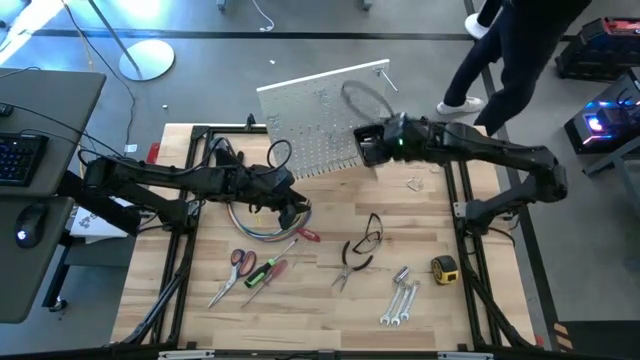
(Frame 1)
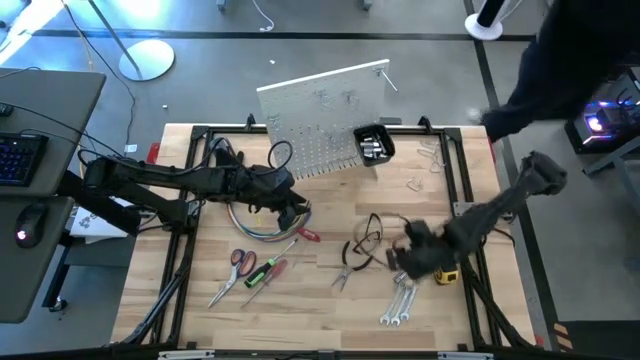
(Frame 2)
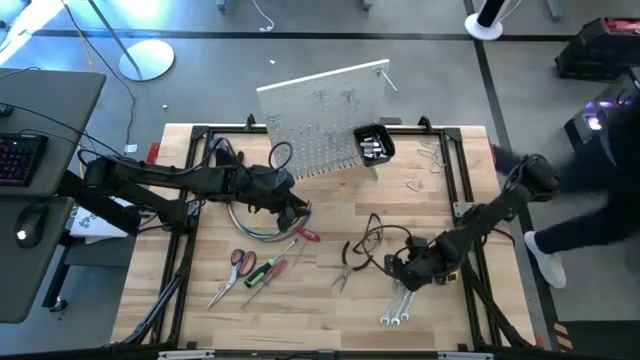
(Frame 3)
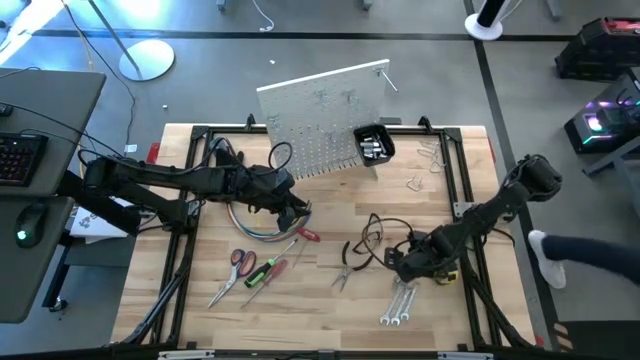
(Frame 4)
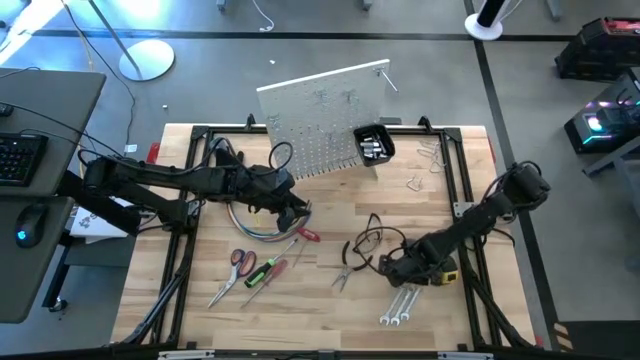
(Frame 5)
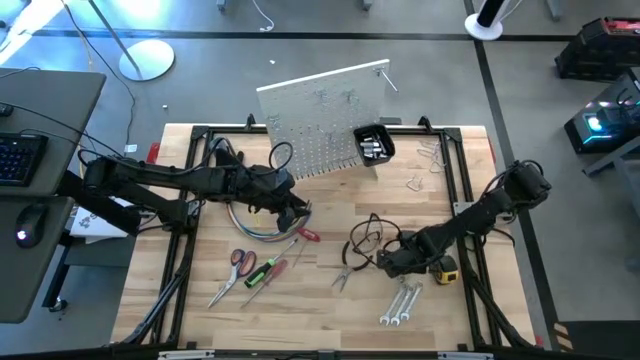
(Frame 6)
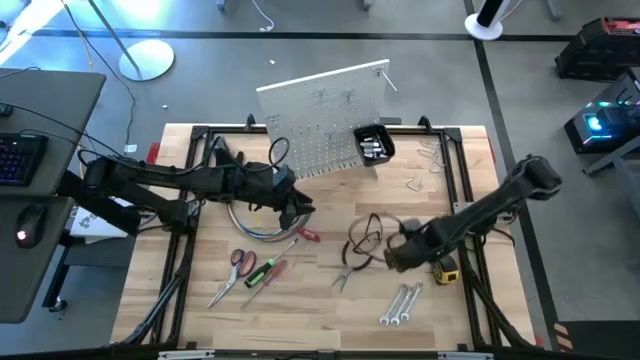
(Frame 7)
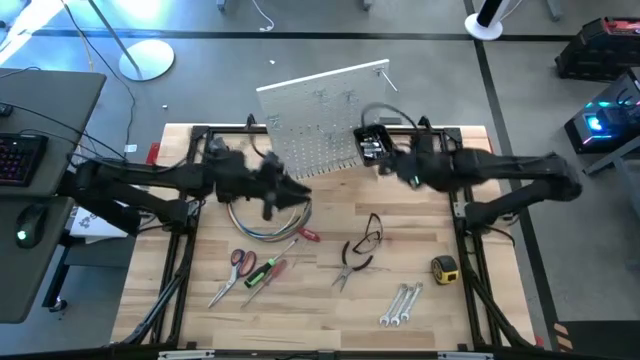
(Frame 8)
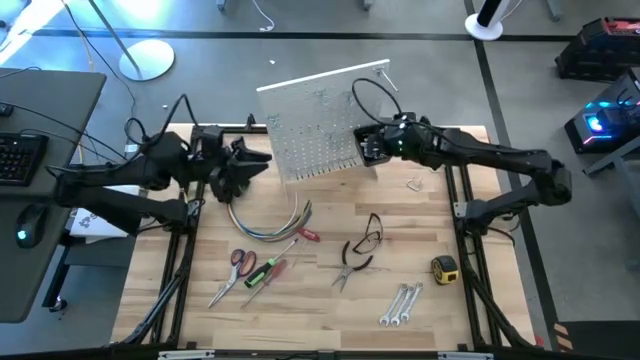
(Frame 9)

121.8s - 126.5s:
Task: Hang tools onto peg board
Put the socket into the black bin on the peg board

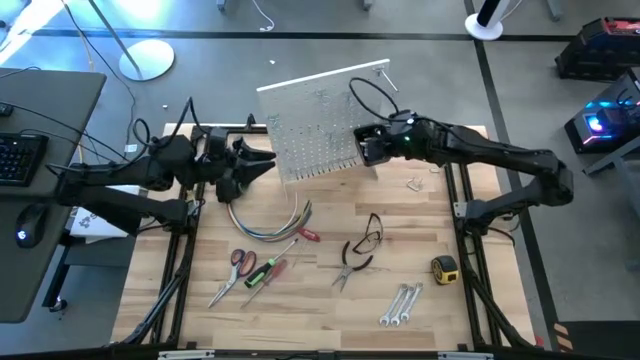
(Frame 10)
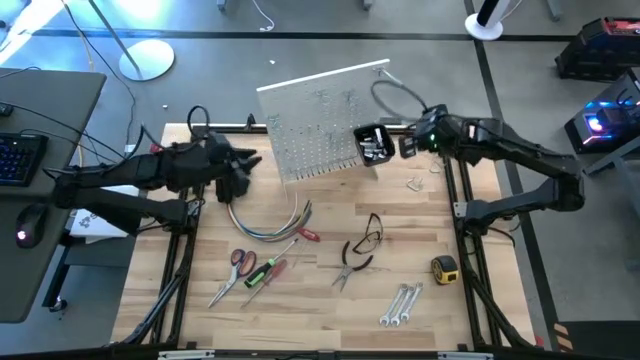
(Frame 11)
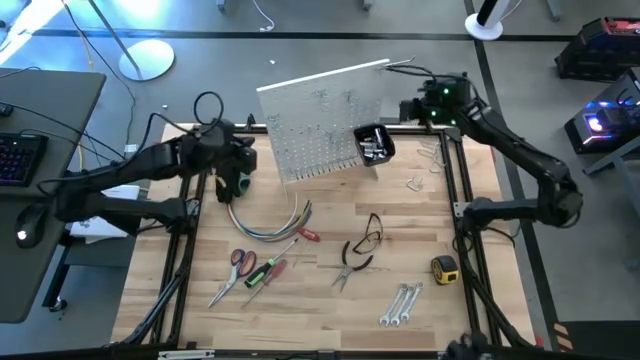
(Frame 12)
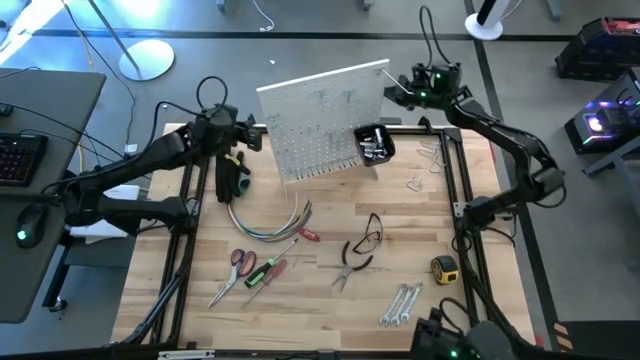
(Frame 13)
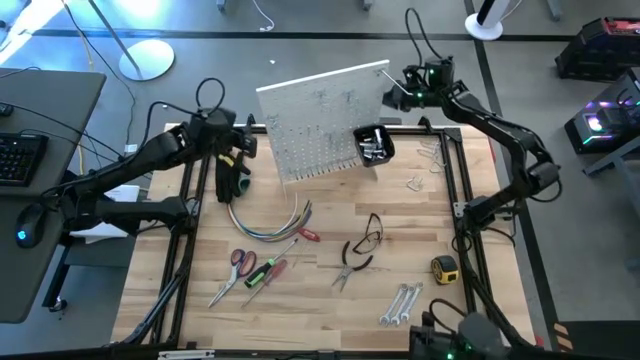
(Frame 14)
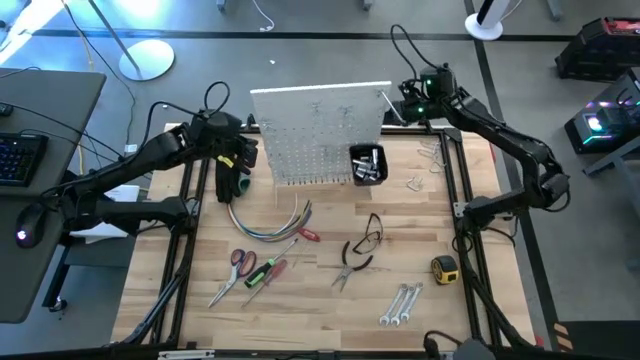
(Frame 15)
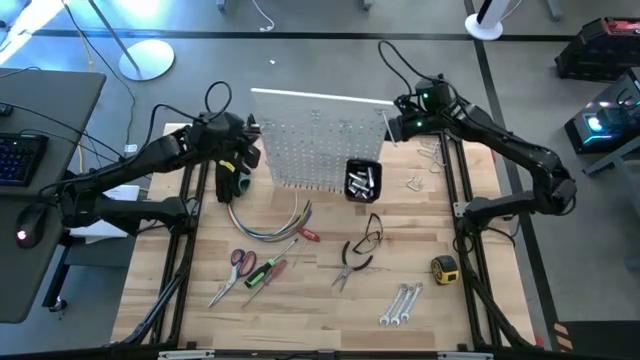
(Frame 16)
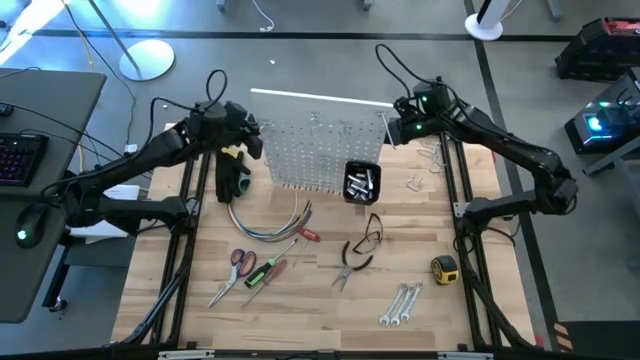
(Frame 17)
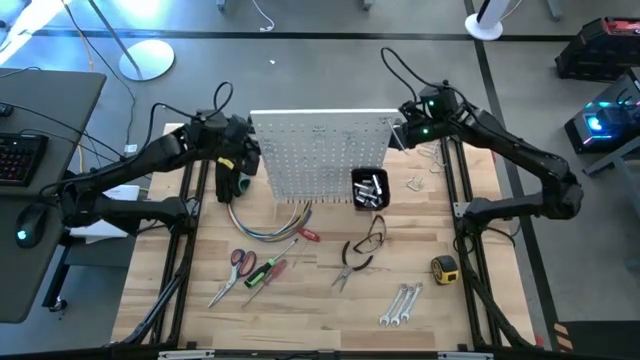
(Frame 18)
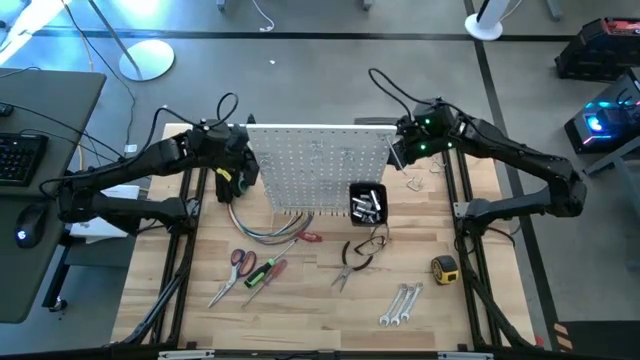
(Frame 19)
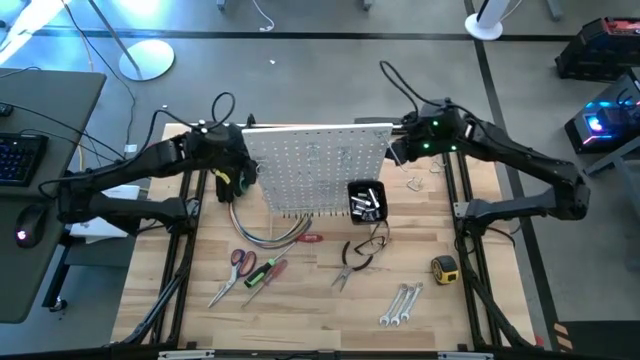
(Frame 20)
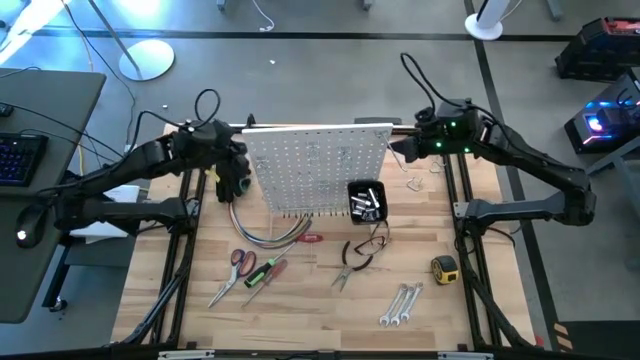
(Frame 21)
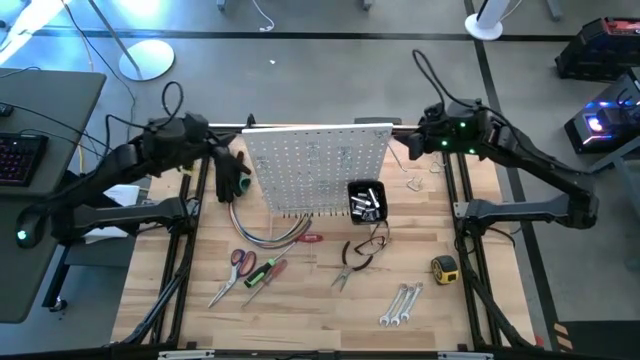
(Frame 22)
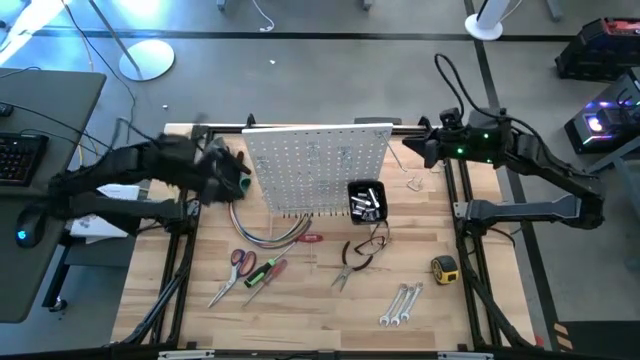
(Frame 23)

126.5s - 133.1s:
Adjust the peg board

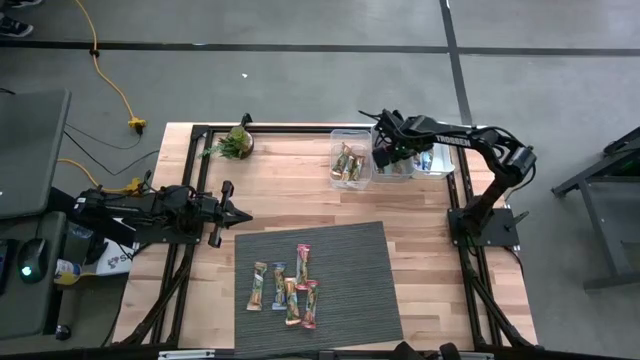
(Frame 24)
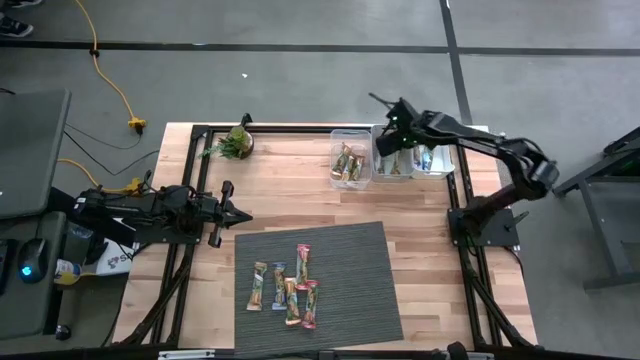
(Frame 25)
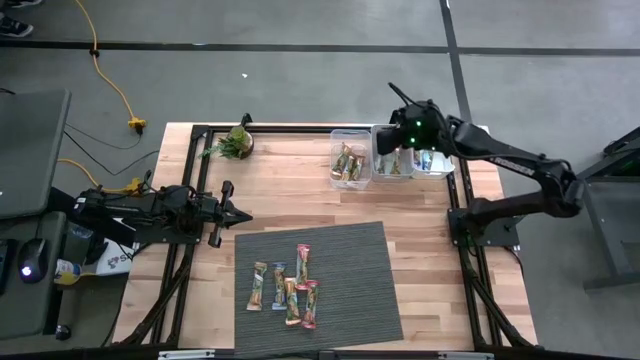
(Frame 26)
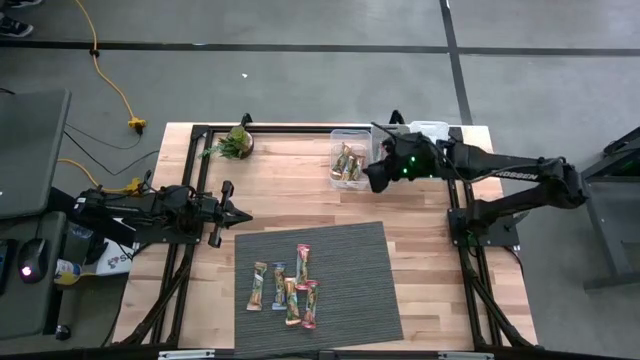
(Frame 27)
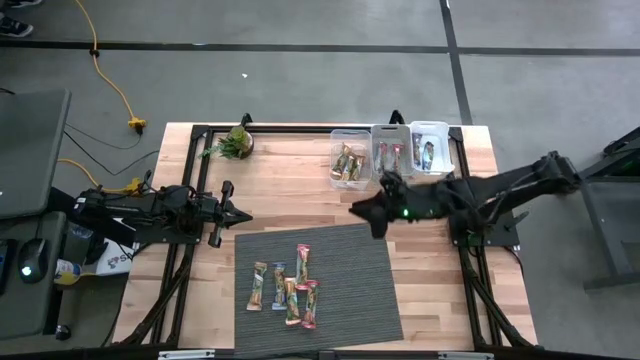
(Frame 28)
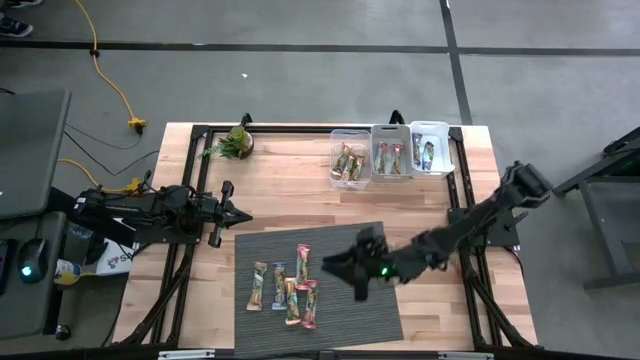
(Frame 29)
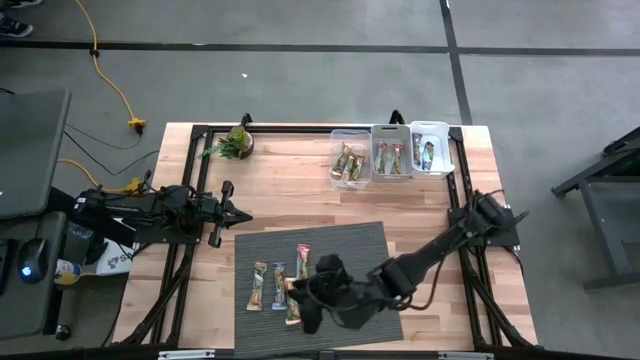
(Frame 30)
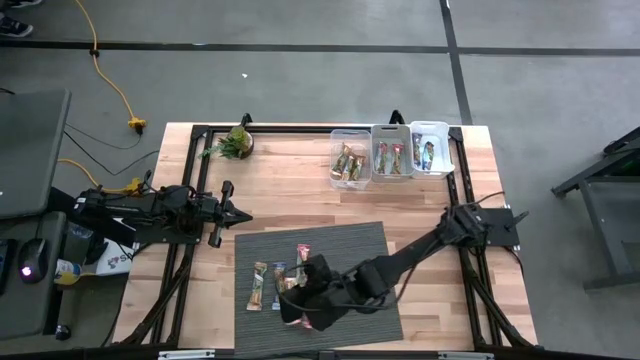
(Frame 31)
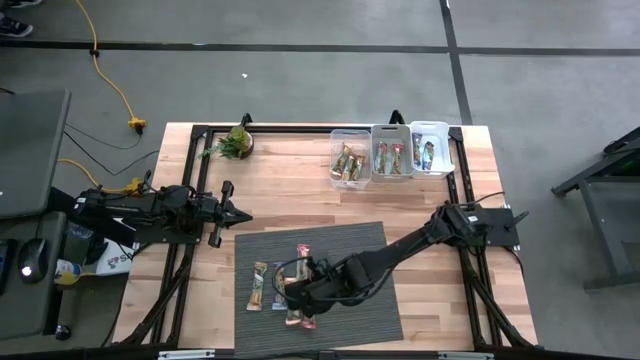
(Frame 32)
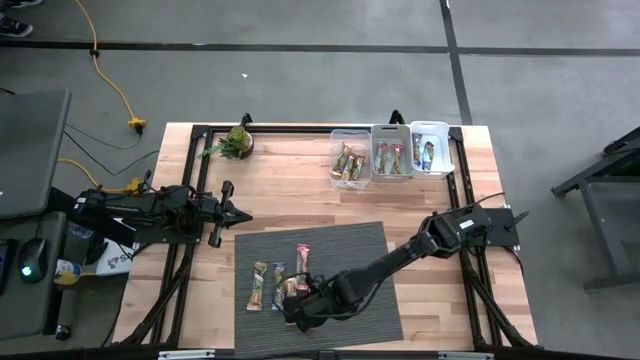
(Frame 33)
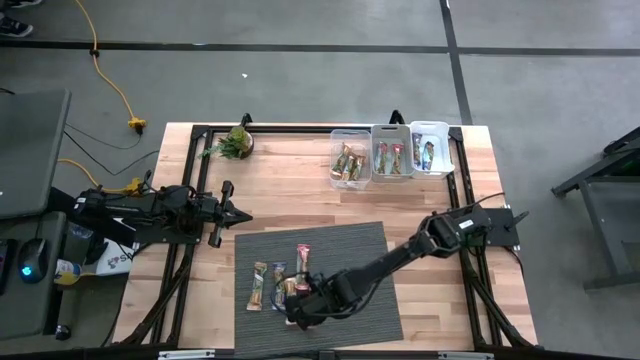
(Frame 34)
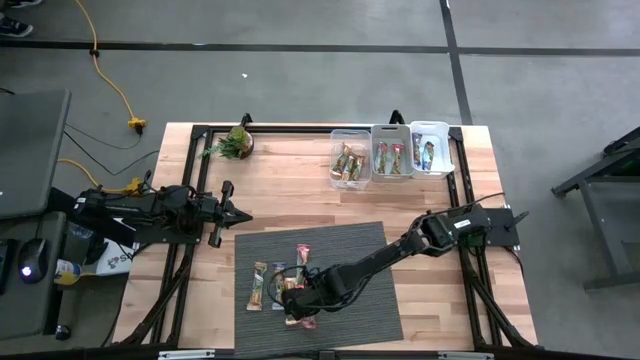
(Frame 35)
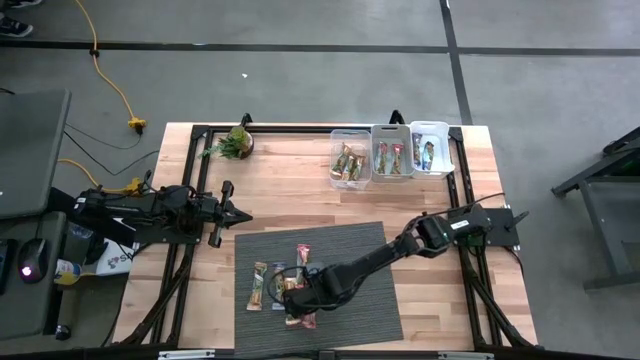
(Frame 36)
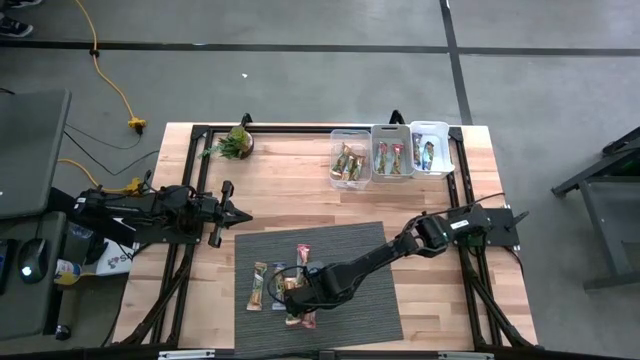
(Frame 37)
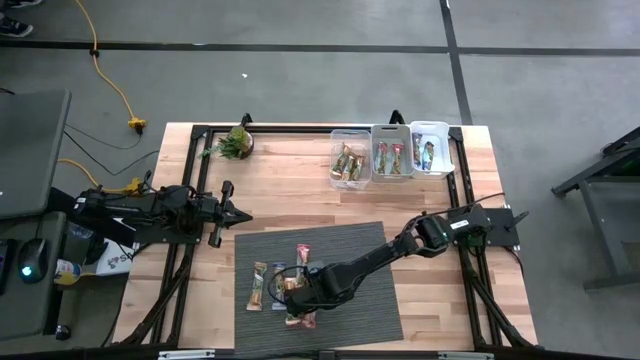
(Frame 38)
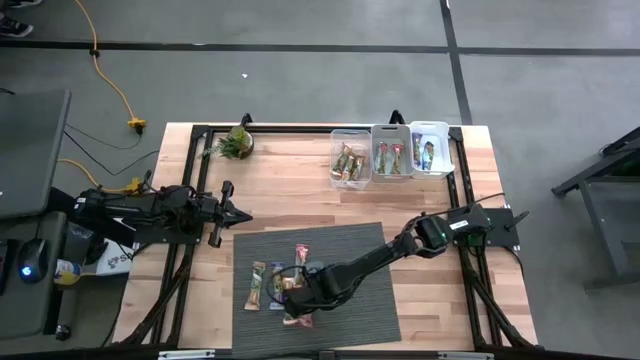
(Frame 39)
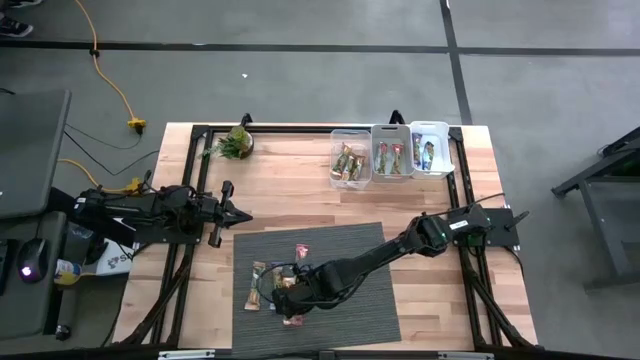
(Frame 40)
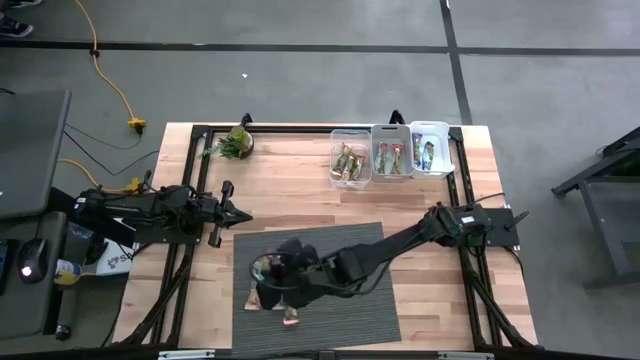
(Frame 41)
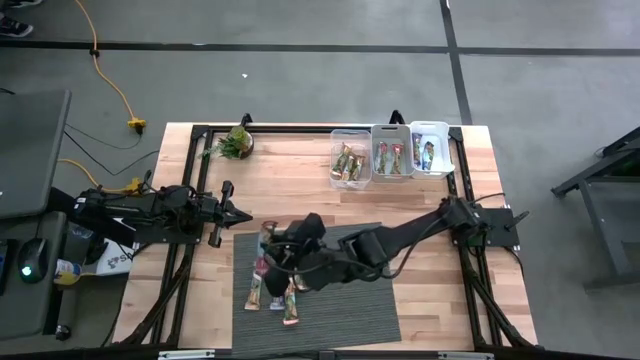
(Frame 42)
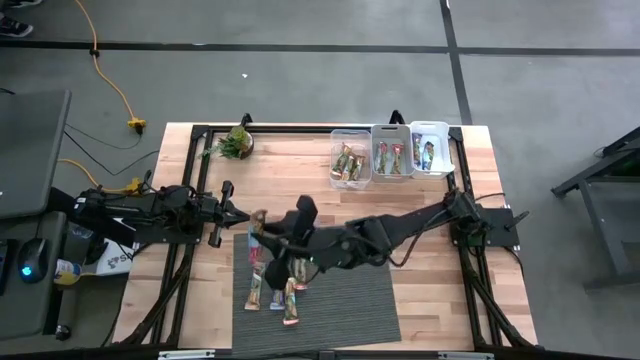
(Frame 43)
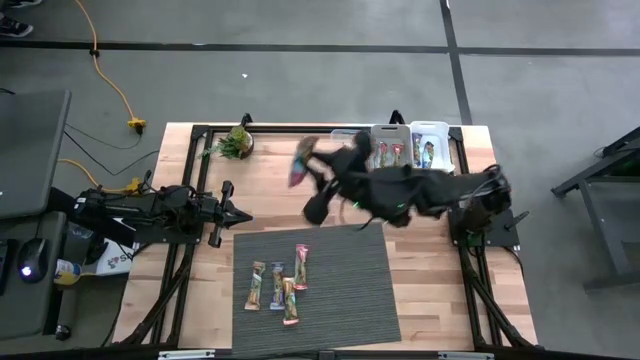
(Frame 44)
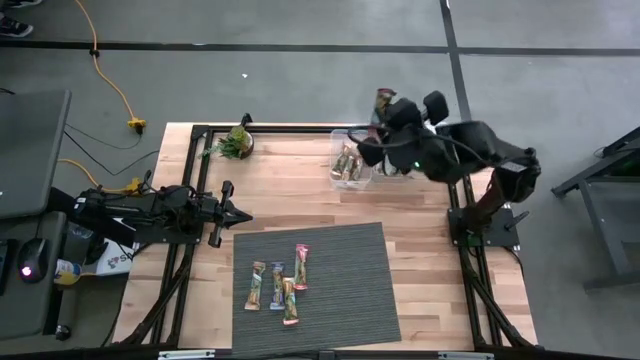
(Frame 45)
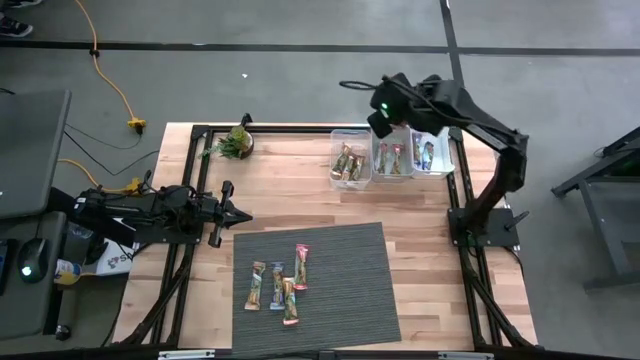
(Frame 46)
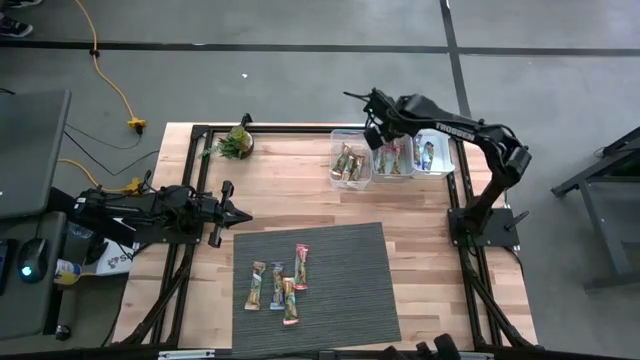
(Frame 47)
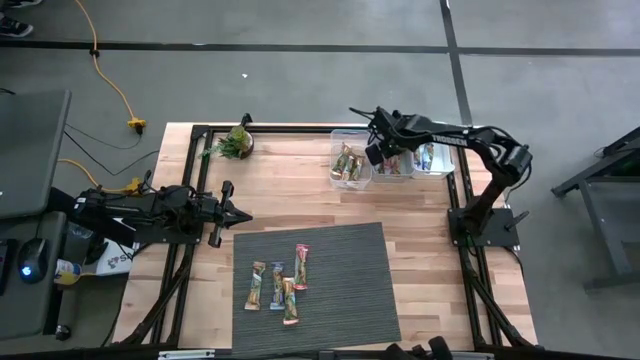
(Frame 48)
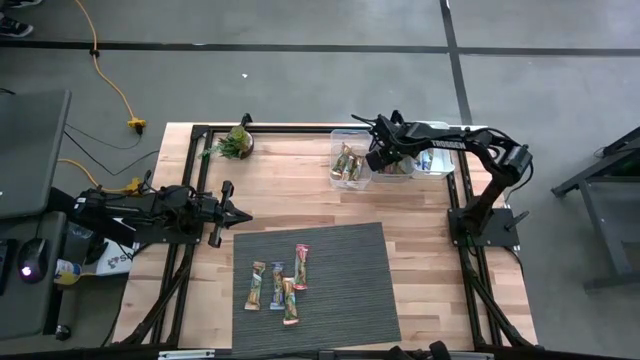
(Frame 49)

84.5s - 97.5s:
Task: Pick and place Granola Bars by type
Put the red granola bar into the gray bin
